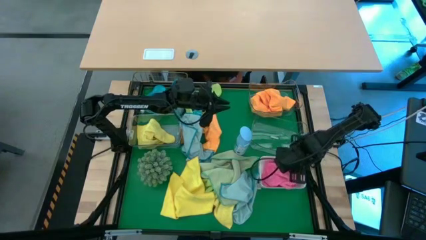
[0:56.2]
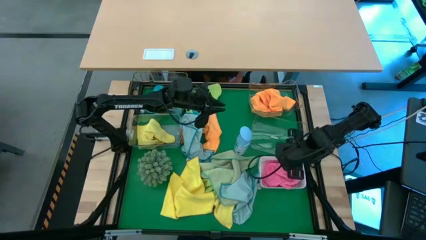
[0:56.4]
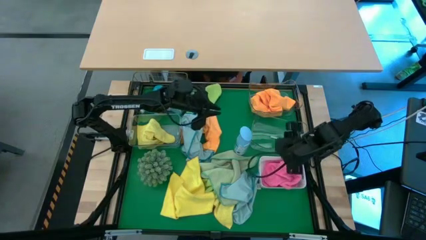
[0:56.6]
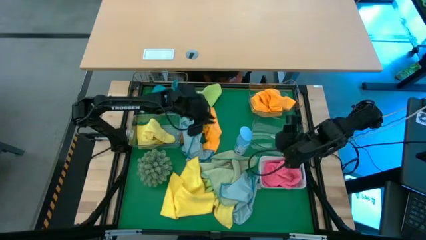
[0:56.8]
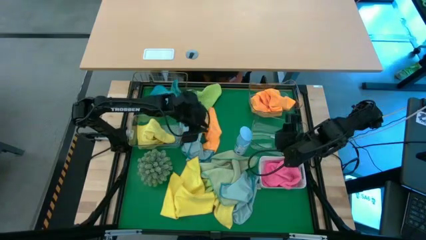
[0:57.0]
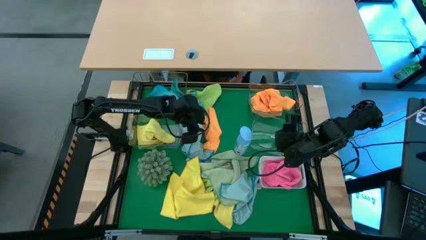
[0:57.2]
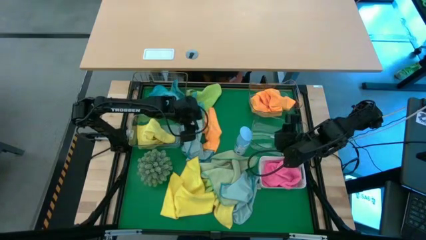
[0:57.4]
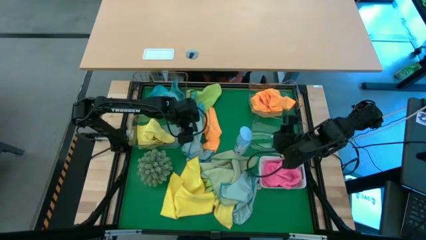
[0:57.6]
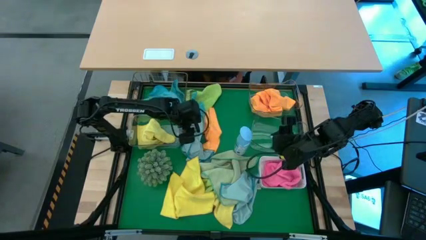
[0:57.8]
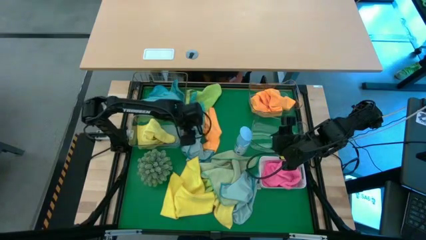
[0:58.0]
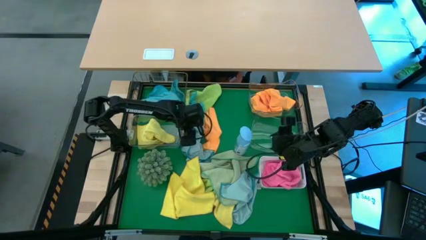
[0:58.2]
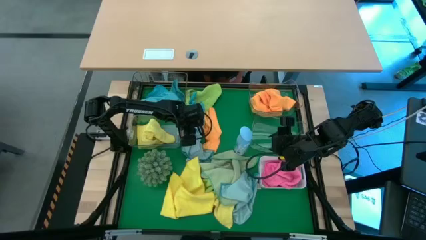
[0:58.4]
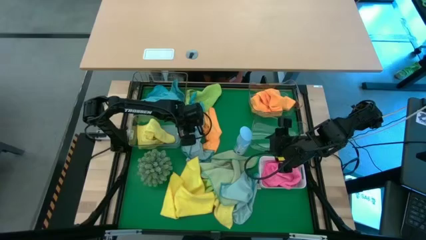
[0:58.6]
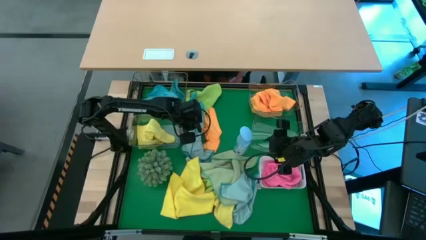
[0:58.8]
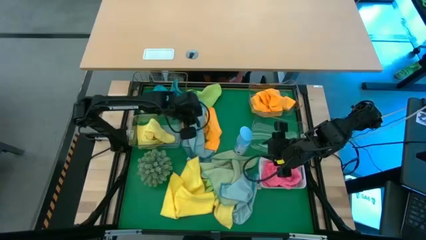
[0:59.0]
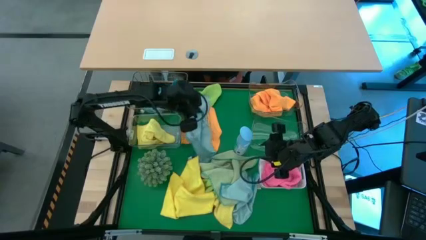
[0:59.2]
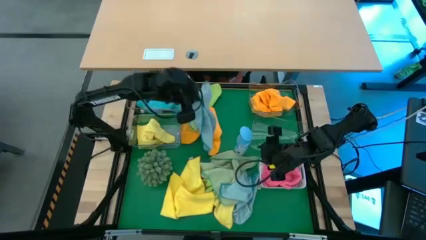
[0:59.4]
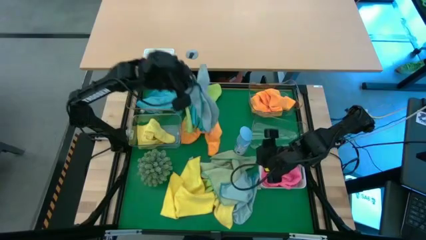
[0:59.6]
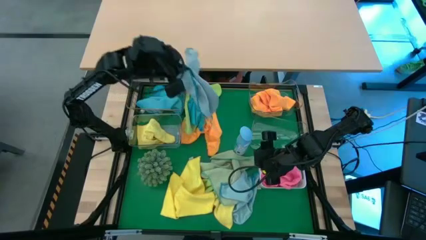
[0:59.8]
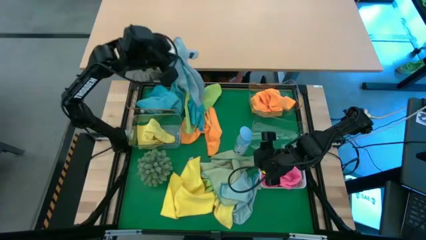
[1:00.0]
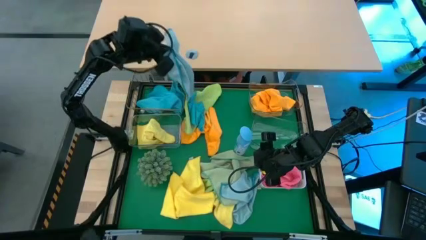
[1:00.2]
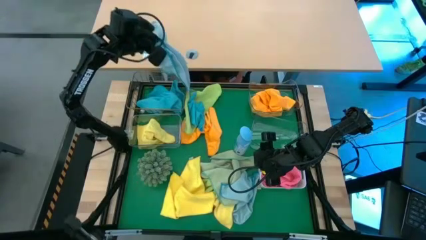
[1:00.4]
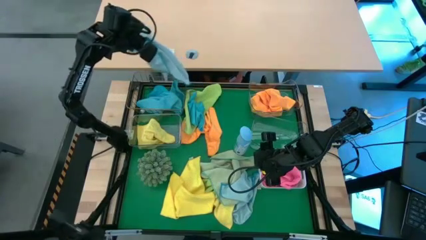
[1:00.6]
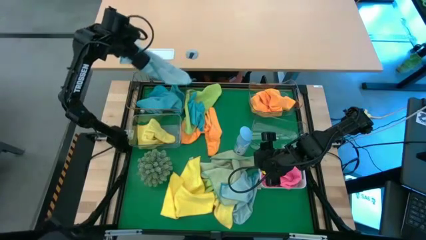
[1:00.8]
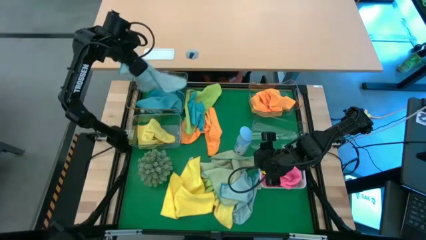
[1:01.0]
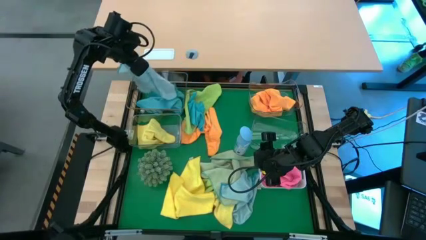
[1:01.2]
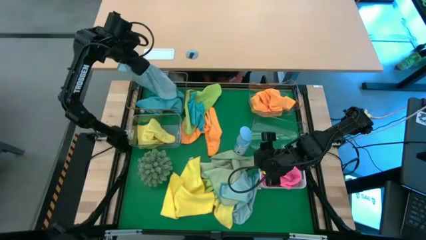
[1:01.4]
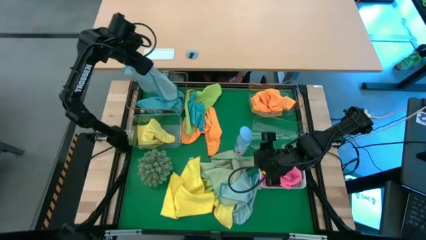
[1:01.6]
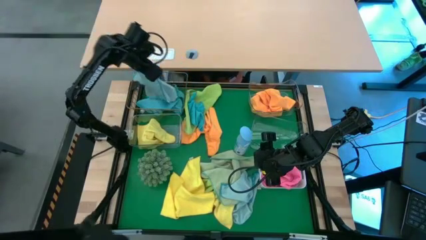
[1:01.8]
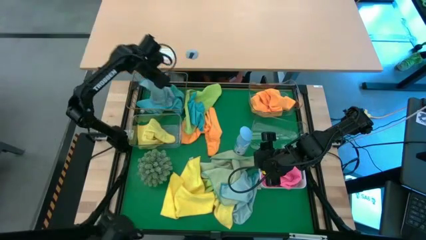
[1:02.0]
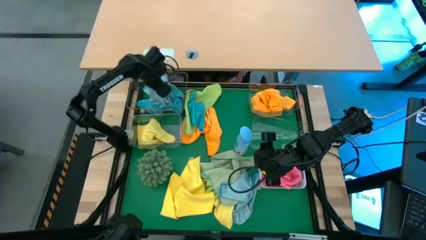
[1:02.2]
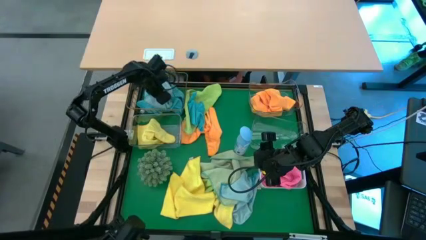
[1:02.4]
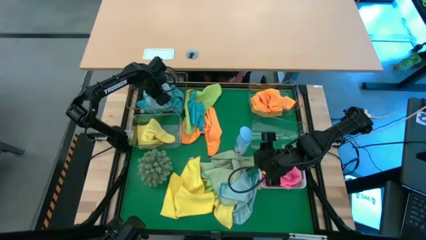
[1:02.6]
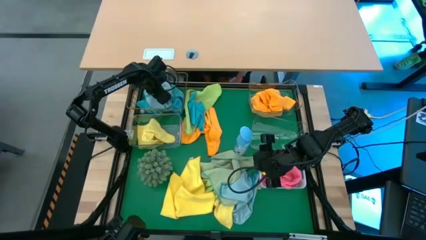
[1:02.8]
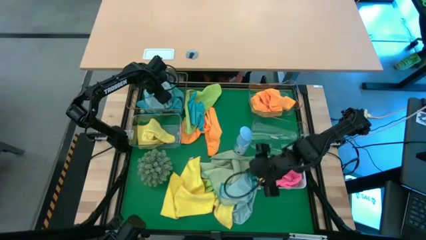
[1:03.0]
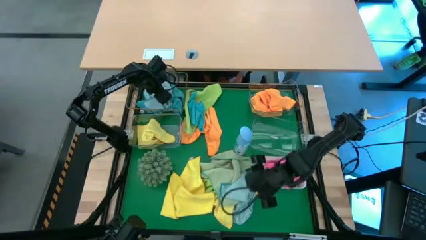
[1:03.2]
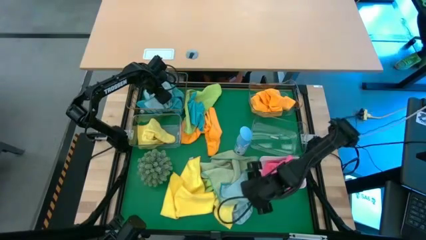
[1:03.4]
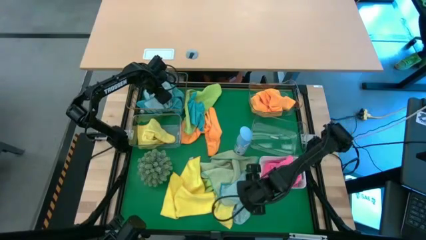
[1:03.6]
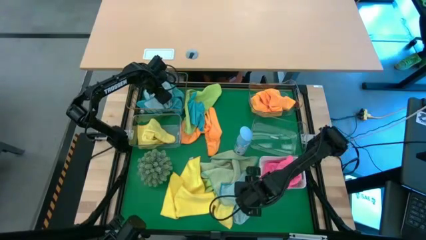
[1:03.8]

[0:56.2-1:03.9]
Task: Sort microfiber towel by color & place in baskets
Put the light blue microfiber towel into the gold wire basket

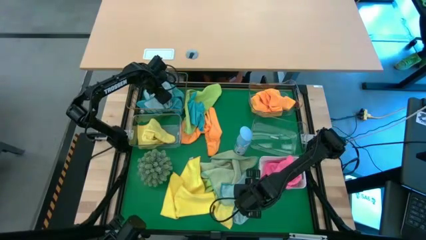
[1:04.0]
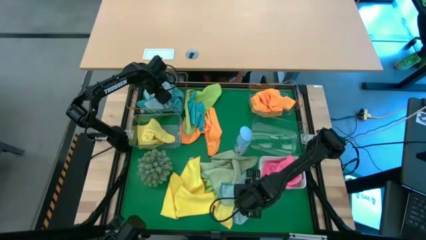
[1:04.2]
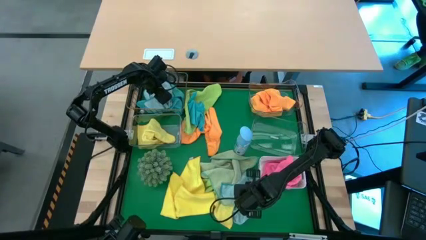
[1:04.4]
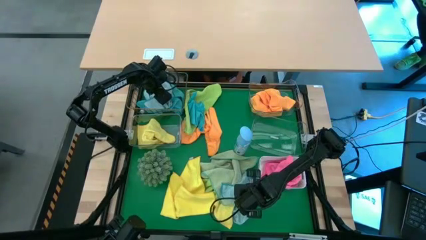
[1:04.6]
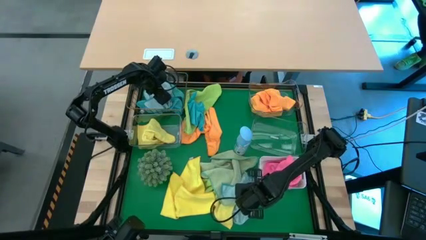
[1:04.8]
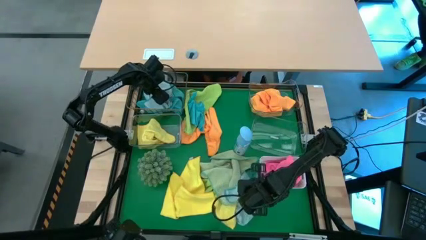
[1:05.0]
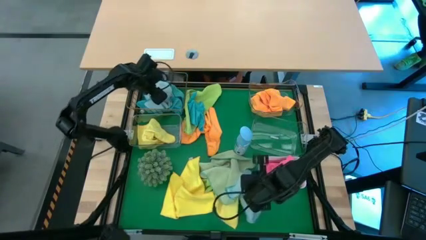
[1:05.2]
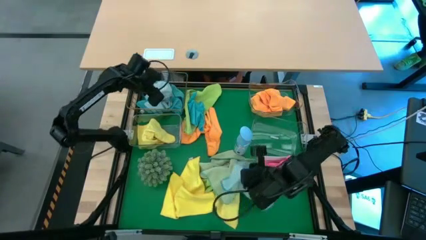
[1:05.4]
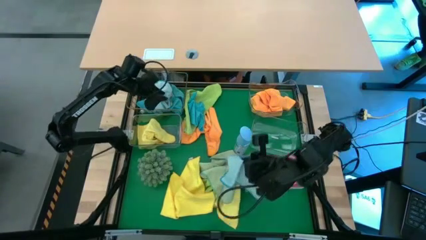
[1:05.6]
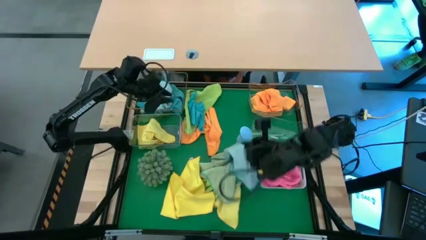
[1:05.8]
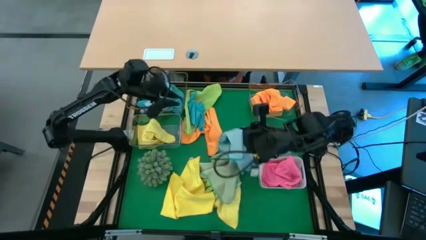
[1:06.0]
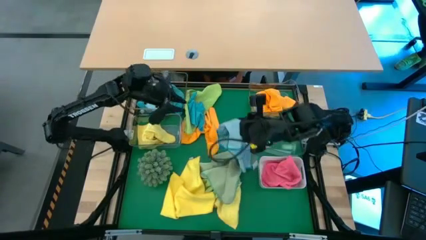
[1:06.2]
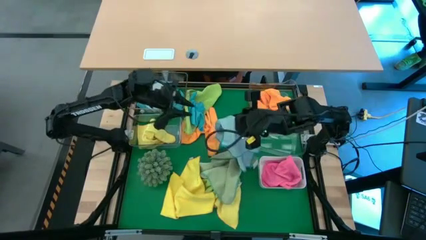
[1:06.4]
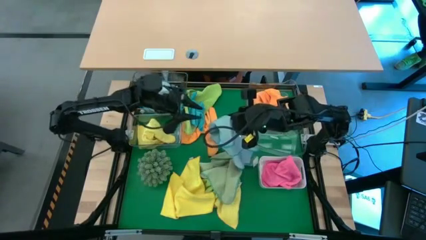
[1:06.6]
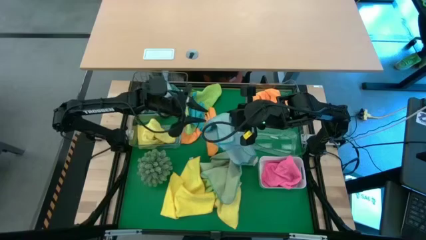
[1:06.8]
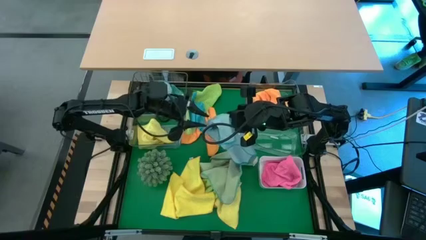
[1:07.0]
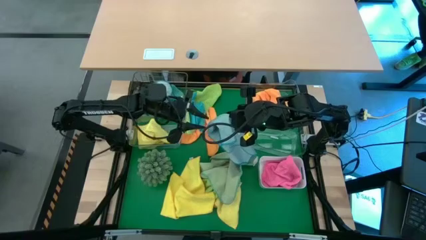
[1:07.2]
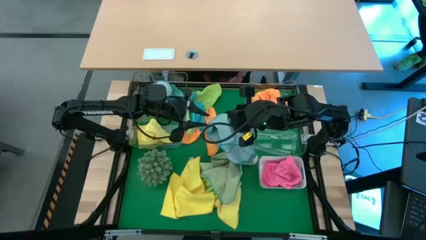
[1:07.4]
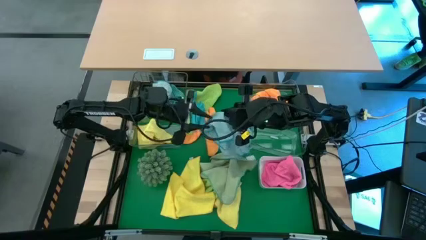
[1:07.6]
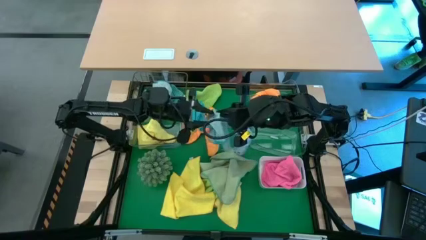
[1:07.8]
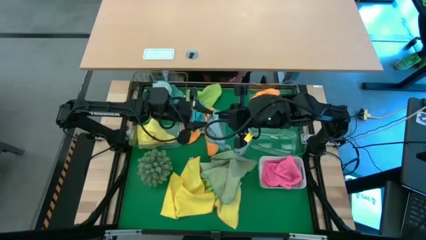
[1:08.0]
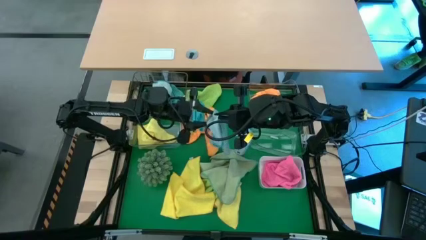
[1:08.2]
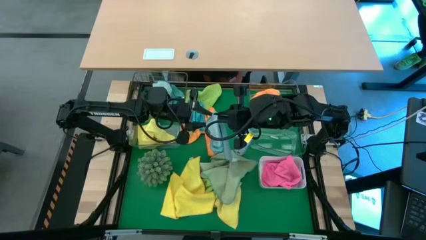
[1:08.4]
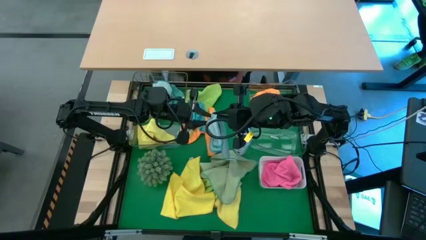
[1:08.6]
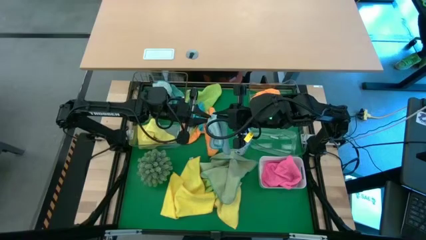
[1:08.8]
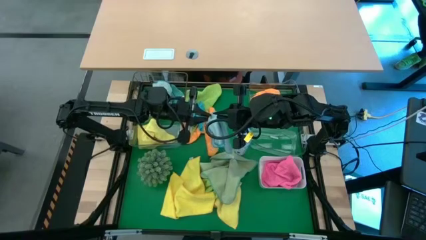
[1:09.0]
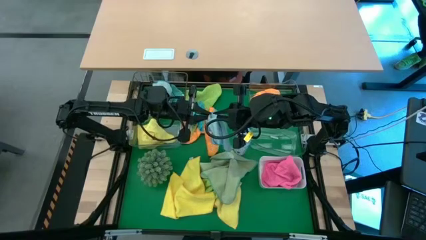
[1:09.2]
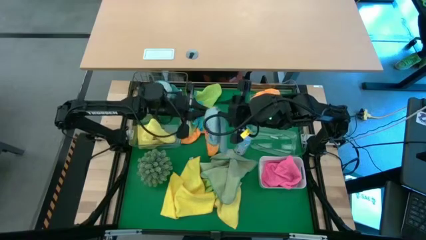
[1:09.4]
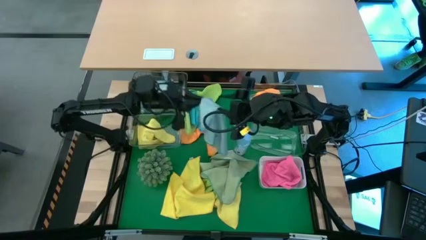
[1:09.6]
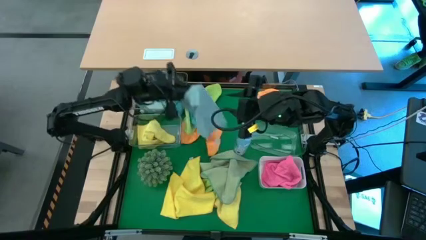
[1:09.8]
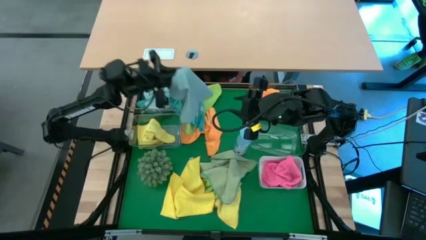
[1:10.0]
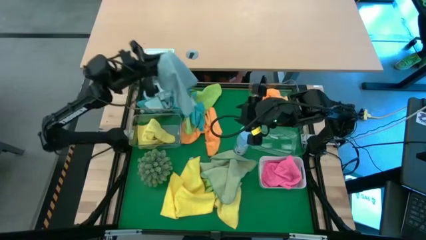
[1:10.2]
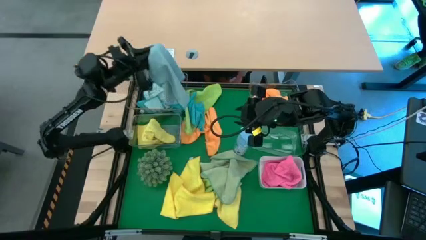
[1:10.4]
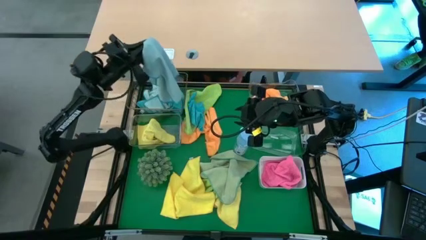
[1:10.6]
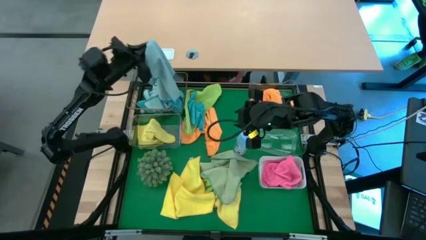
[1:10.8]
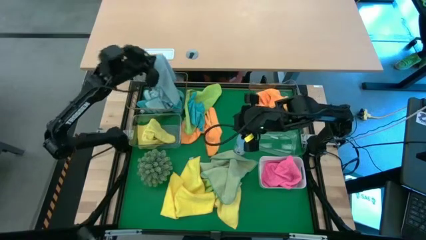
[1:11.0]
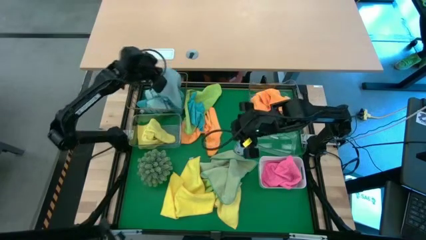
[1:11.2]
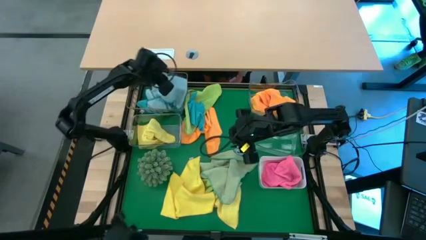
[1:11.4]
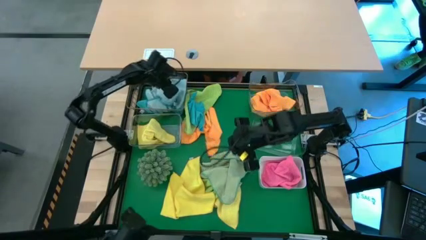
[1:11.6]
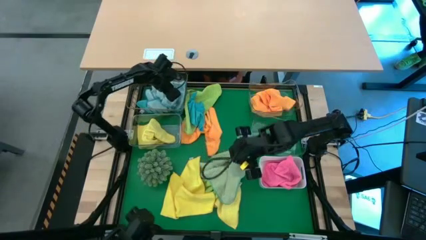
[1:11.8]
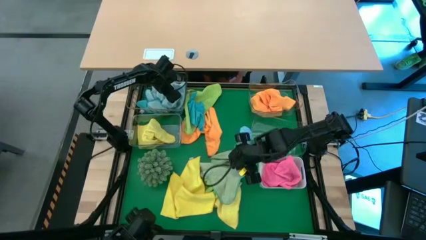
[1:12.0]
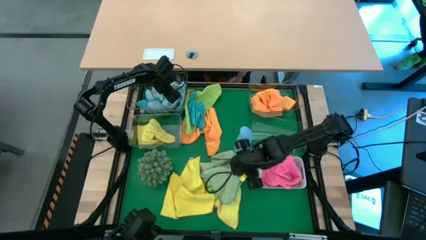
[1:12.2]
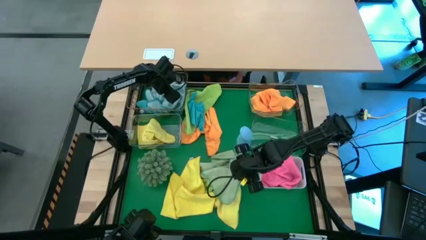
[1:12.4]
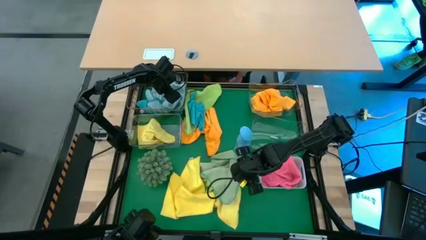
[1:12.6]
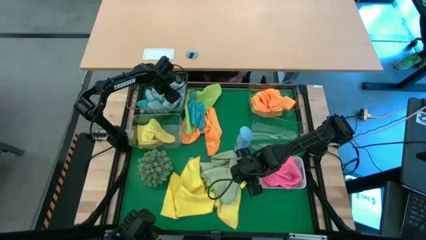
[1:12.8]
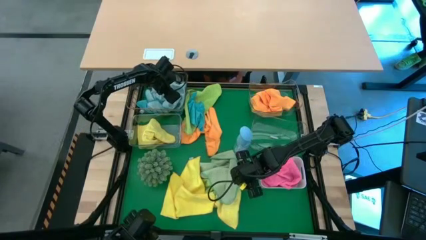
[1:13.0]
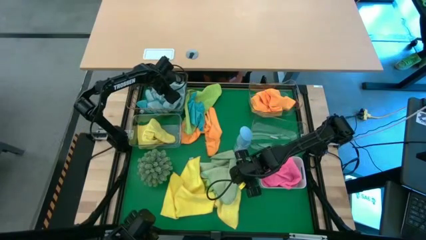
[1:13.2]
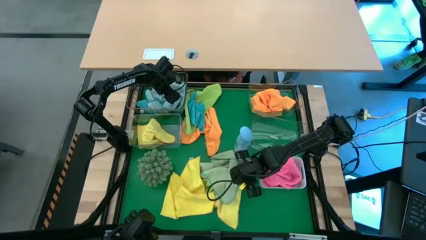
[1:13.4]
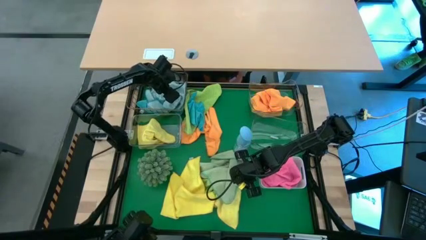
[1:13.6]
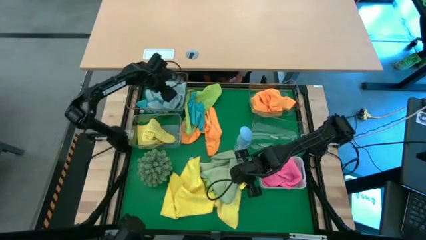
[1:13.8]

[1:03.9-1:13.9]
Put the light blue microfiber towel into the gold wire basket
